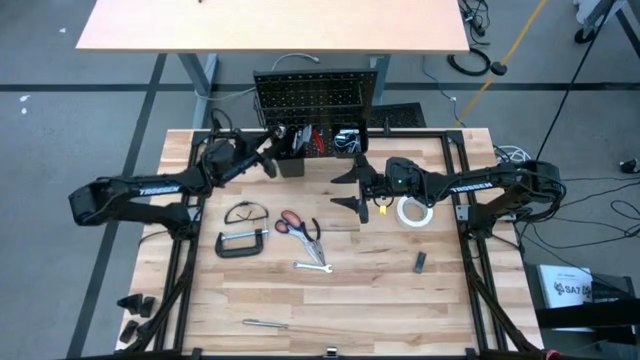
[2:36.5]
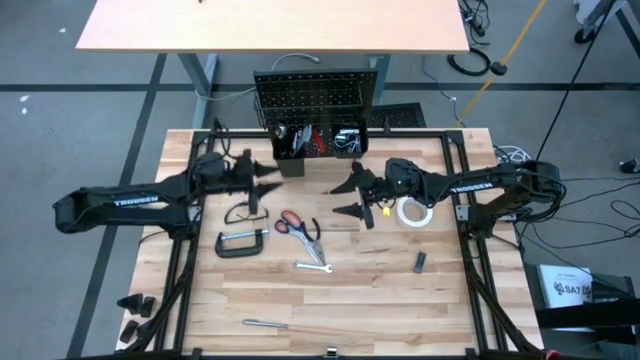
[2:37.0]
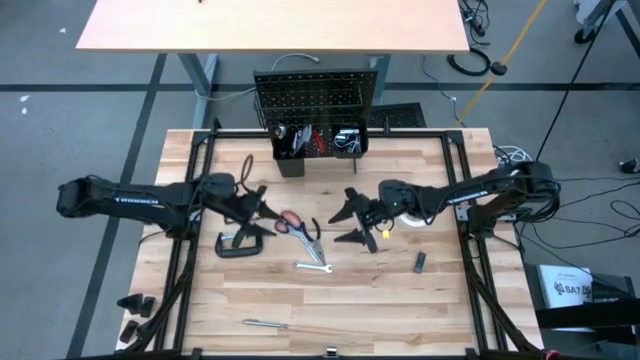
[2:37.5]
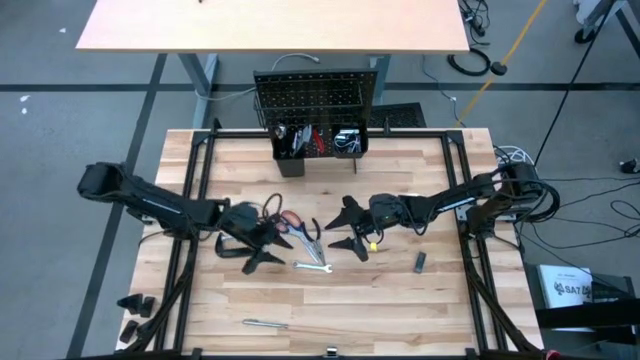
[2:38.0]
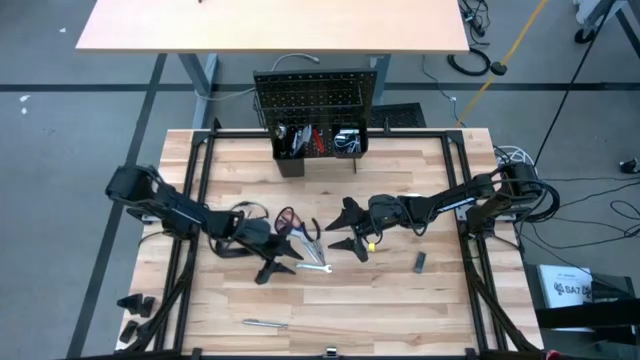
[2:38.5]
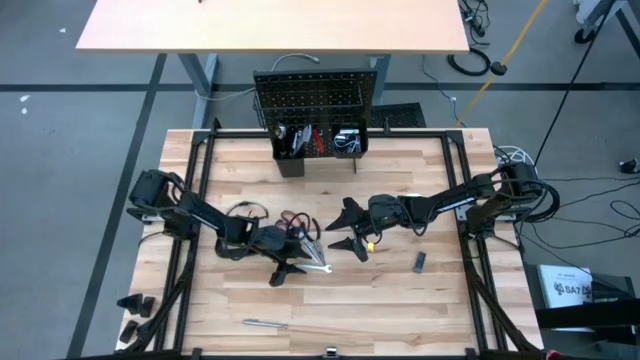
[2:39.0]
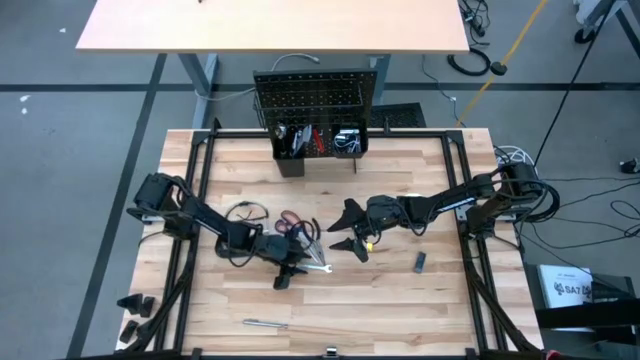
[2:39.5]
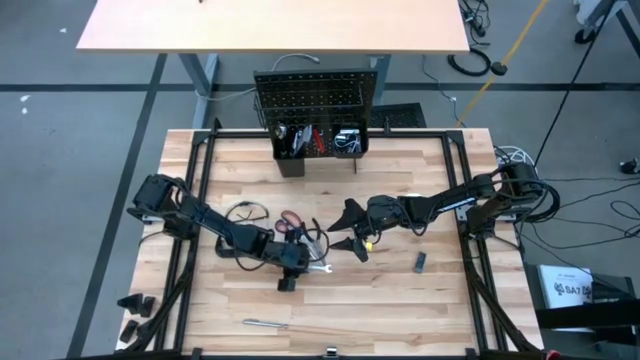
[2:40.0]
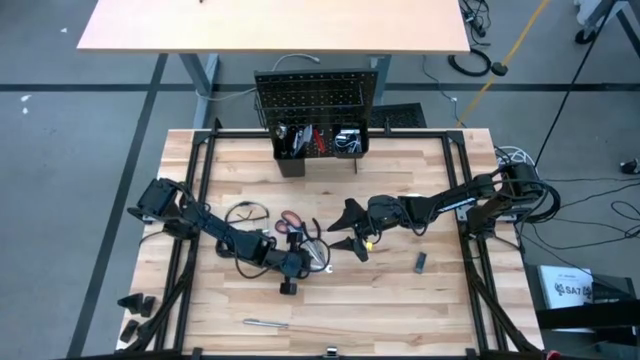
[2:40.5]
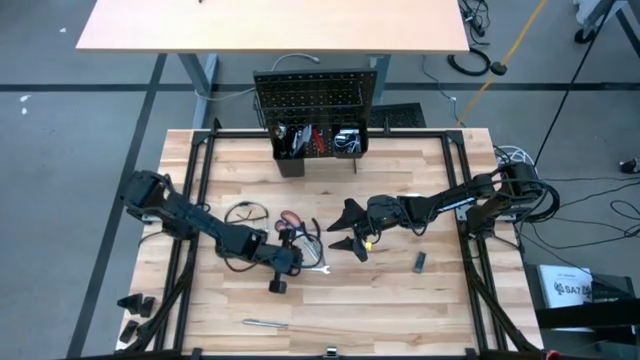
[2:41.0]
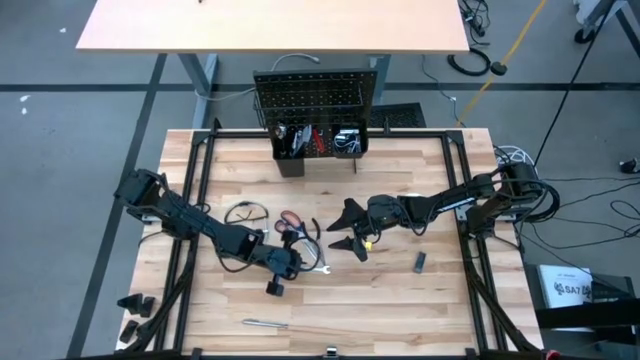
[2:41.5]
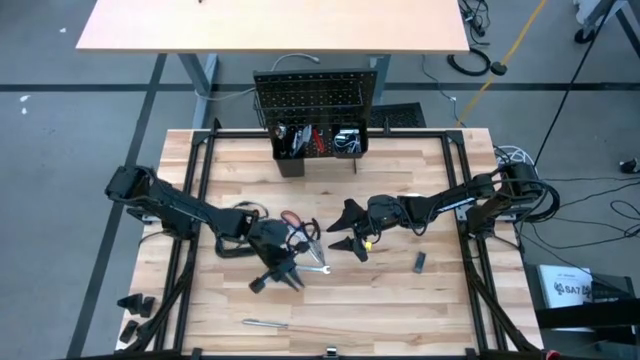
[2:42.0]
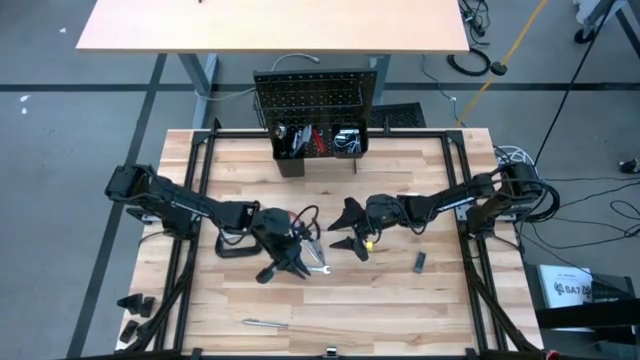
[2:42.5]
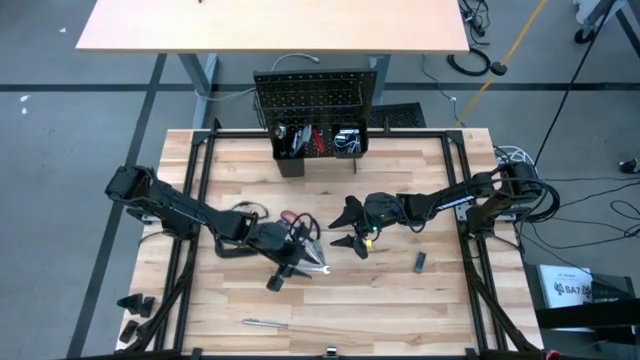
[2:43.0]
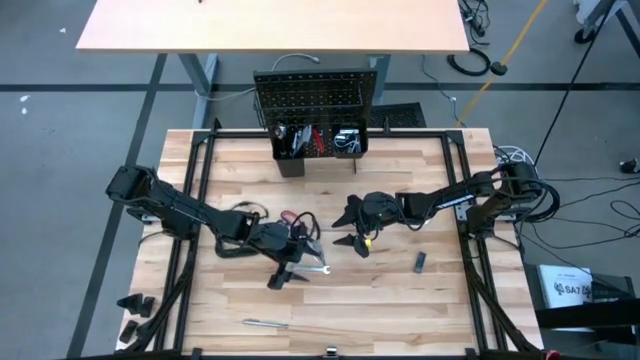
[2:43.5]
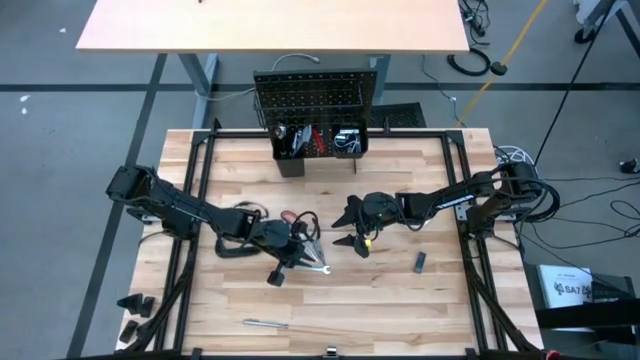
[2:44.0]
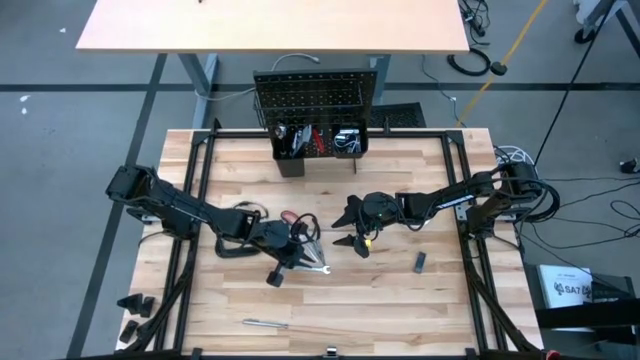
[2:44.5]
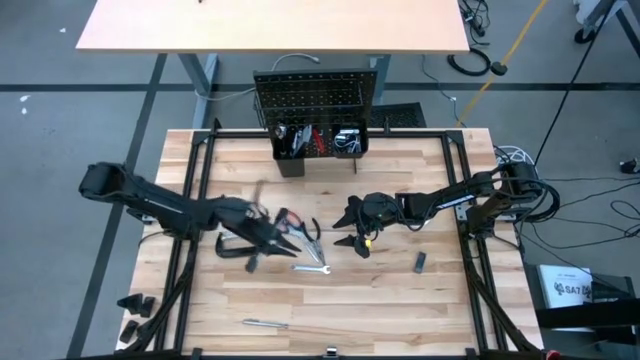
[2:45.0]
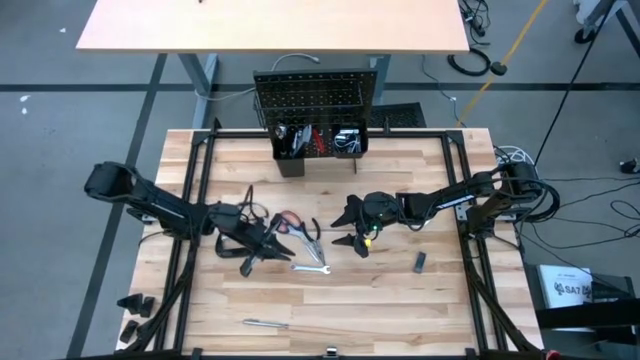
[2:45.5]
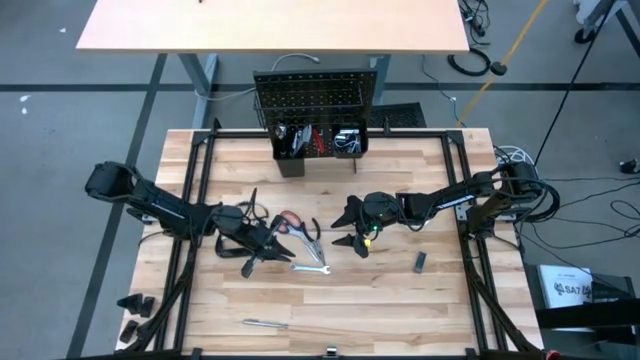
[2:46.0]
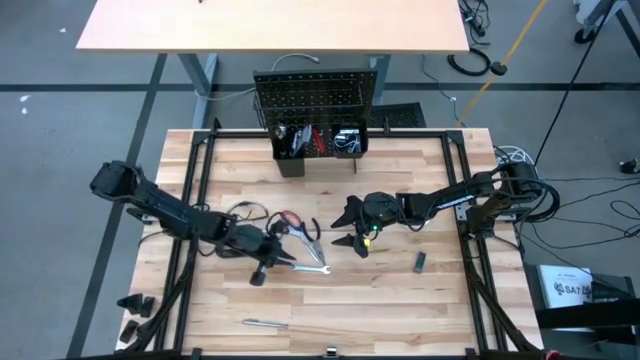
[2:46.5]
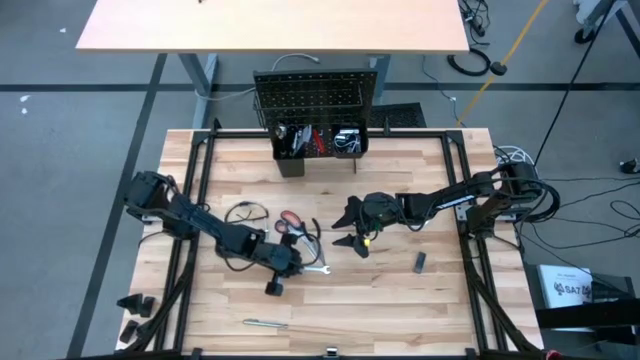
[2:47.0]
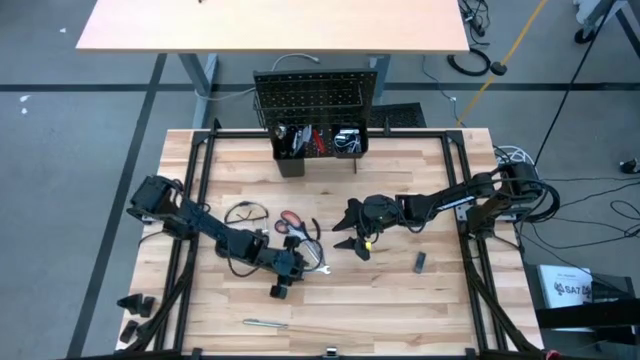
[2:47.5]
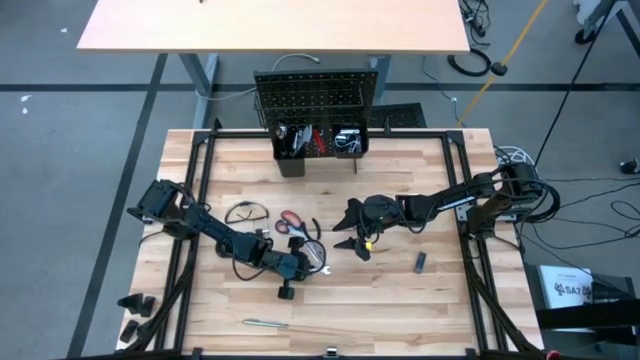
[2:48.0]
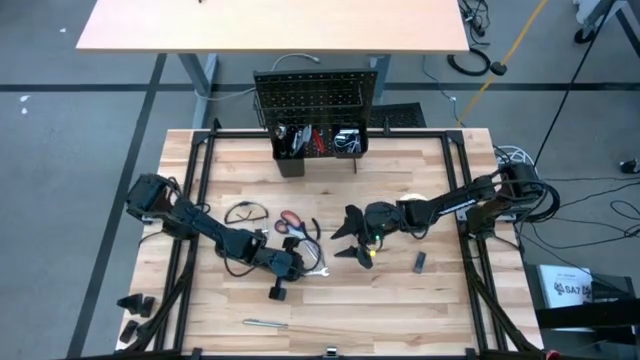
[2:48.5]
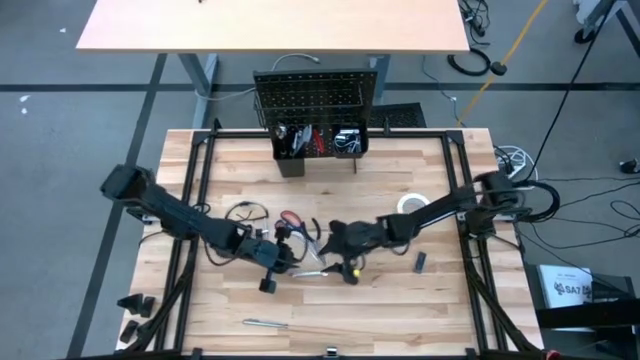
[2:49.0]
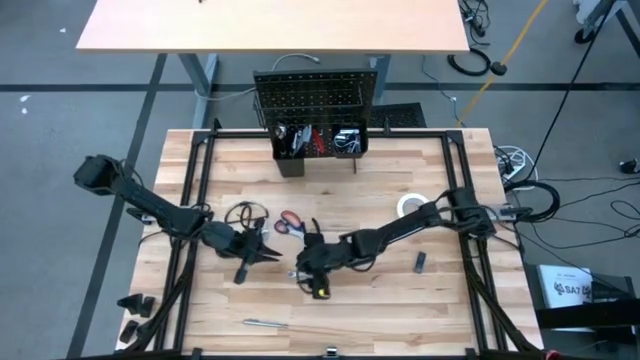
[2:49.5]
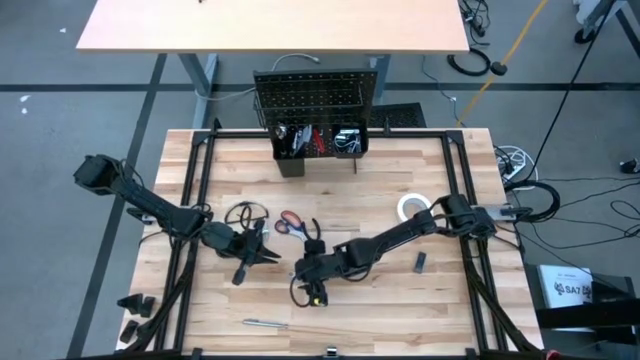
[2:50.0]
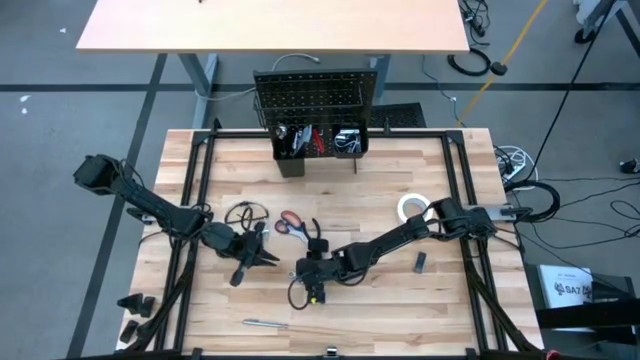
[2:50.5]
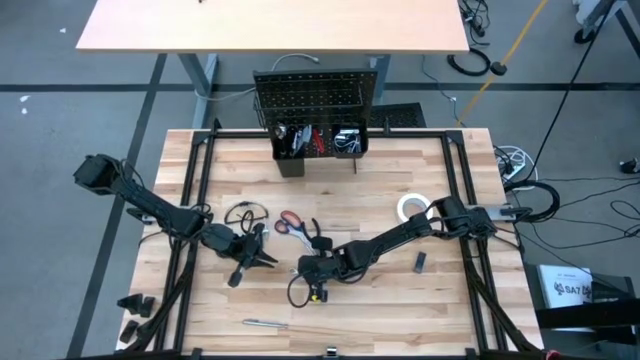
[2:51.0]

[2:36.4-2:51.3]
Task: Hang tools onto peg board
Put the wrench on the left black bin on the peg board

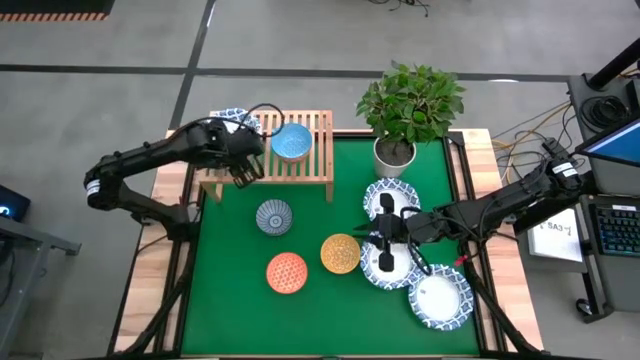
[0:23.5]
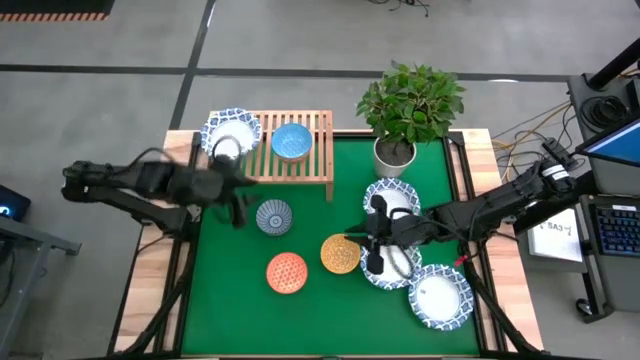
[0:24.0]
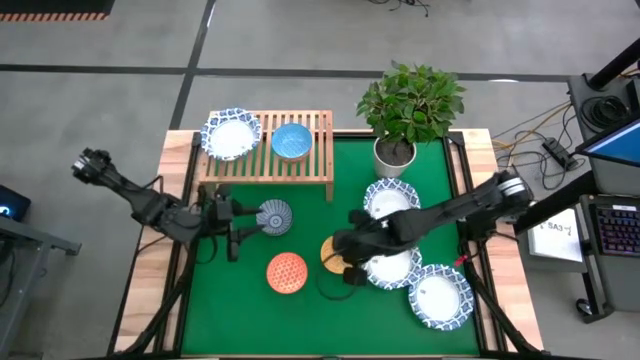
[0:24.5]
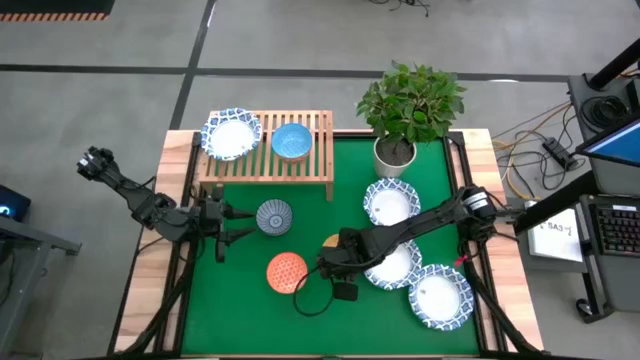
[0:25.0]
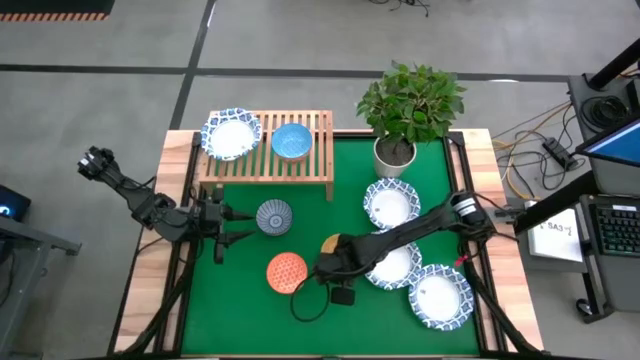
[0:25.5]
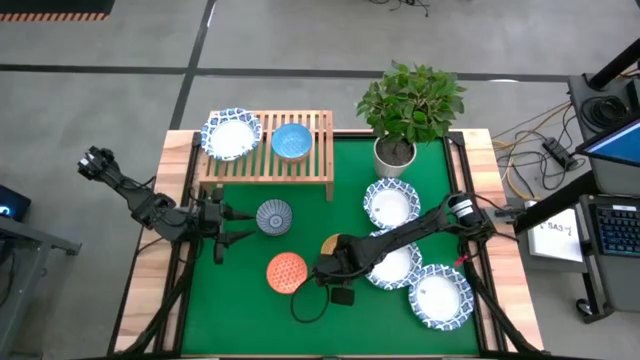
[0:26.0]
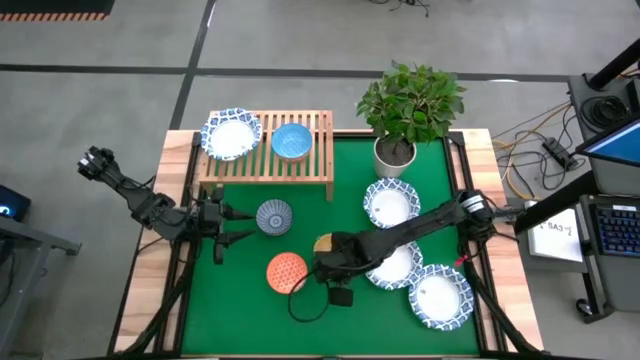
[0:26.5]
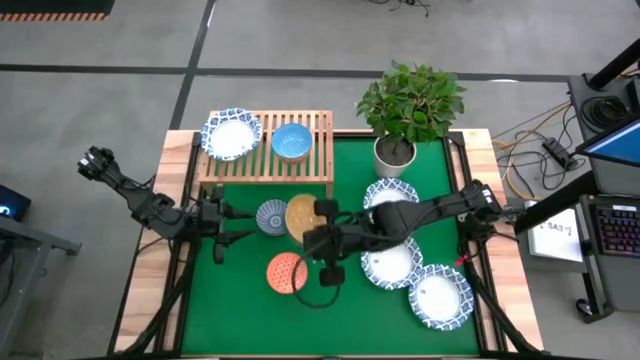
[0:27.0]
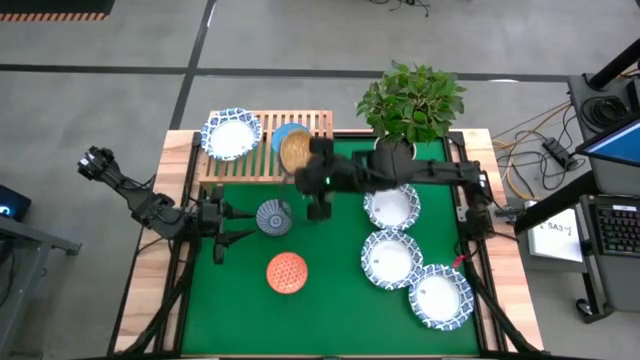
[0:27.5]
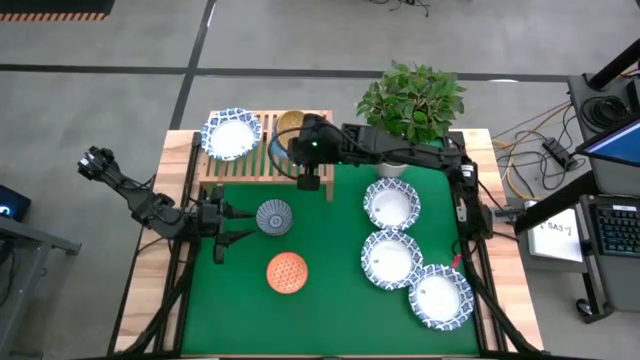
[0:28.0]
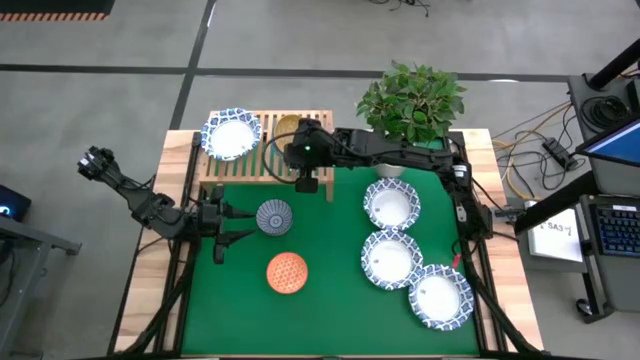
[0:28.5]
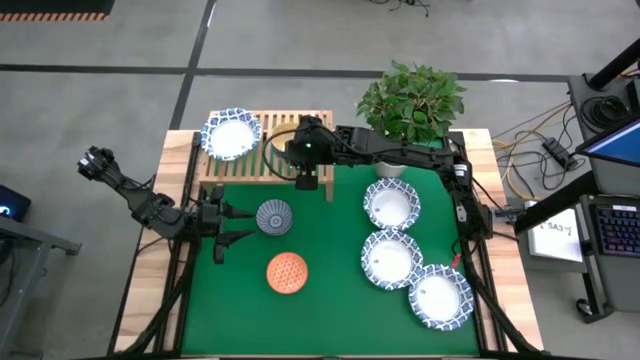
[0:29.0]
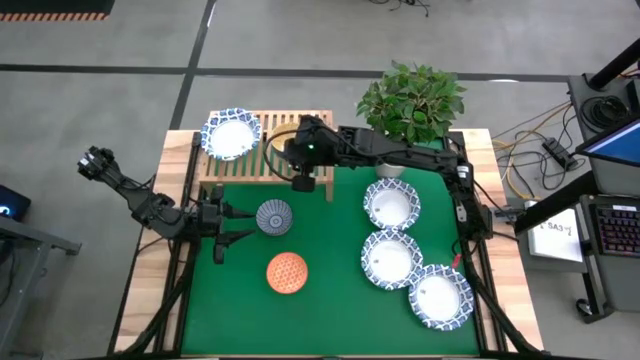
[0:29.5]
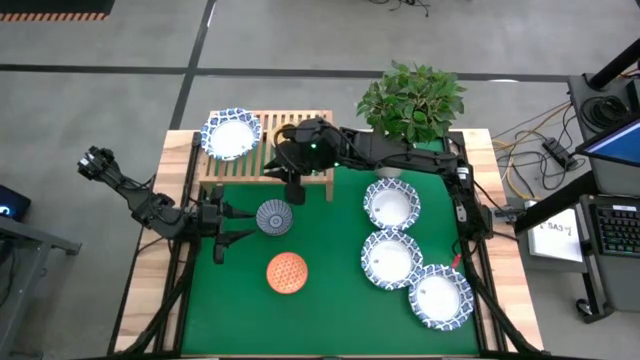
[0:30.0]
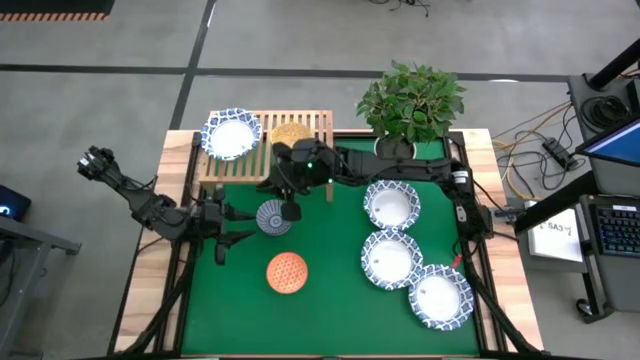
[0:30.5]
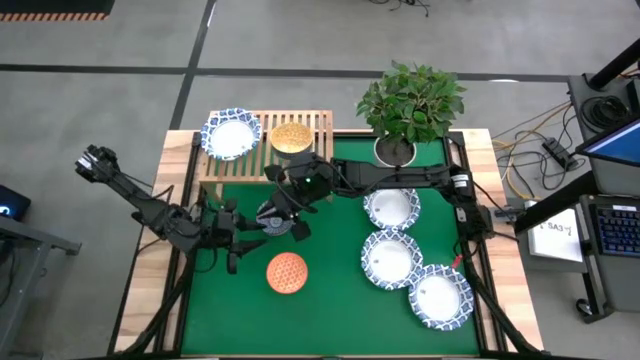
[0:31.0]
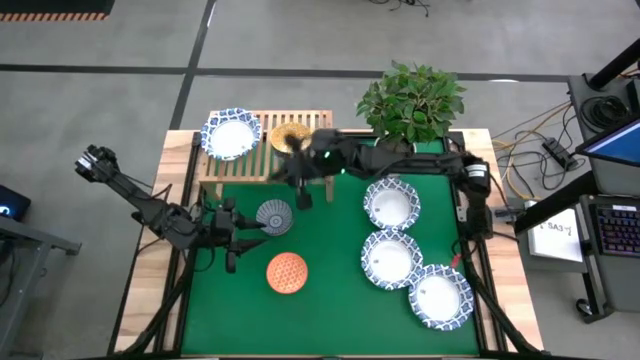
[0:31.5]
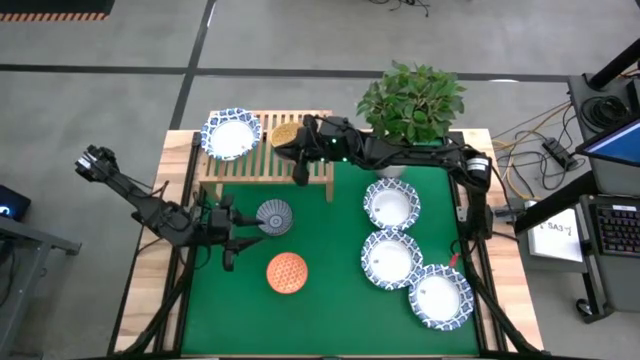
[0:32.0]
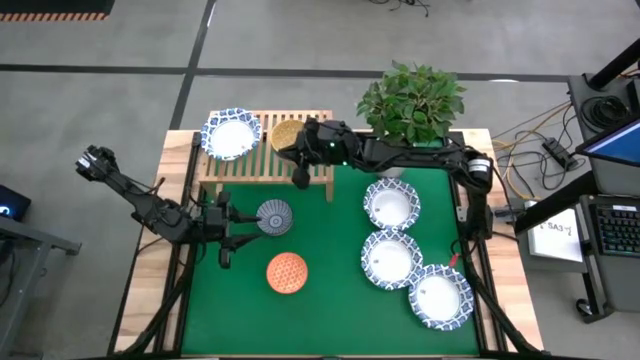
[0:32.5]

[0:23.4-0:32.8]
Task: Place and stack bowls onto a shelf
Stack the yellow bowl on top of the light blue bowl on the shelf
